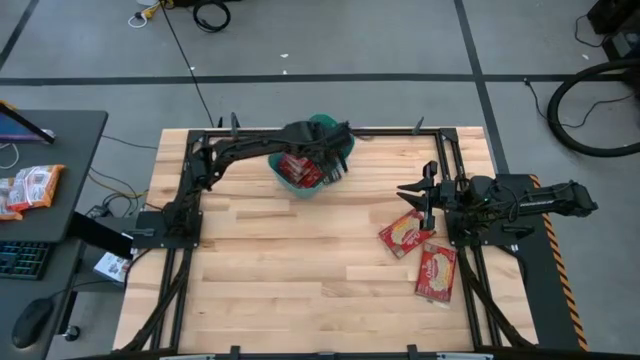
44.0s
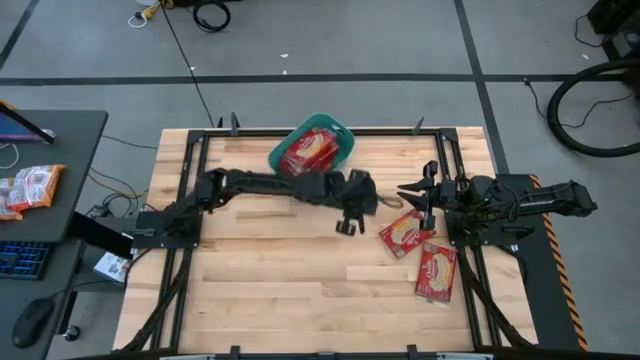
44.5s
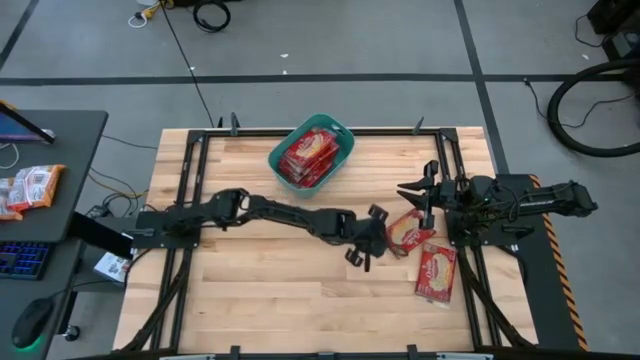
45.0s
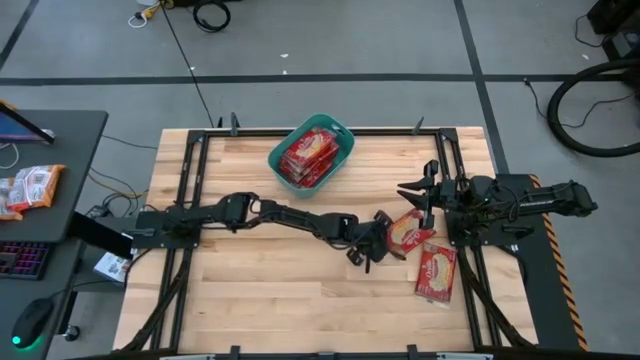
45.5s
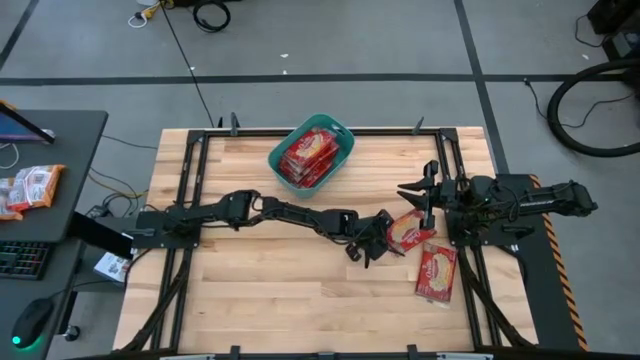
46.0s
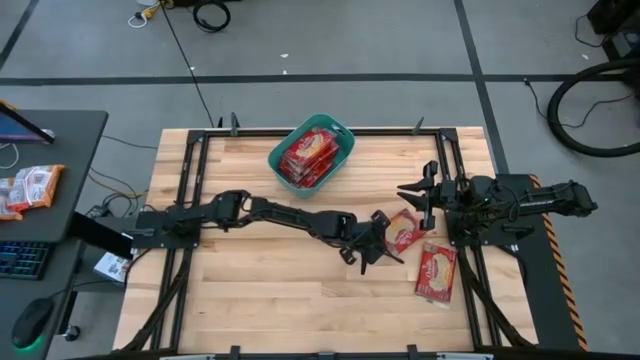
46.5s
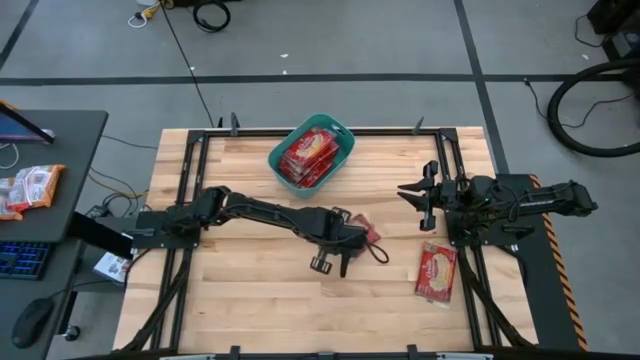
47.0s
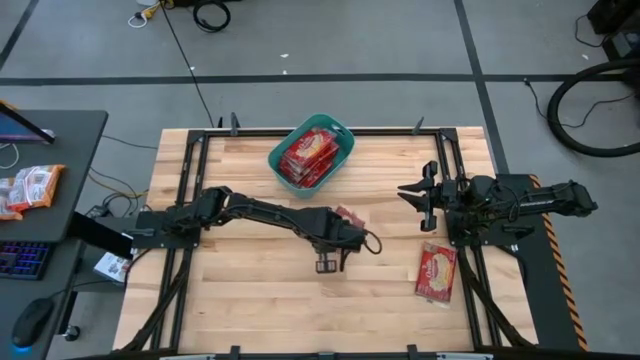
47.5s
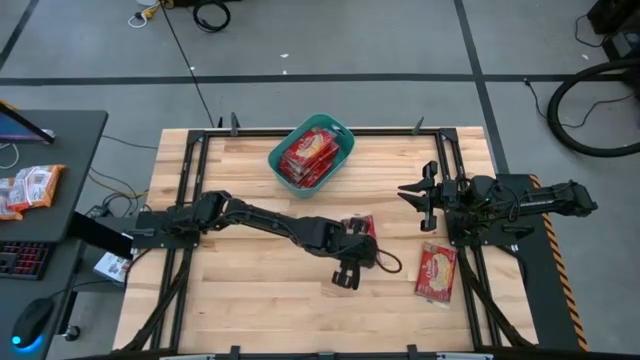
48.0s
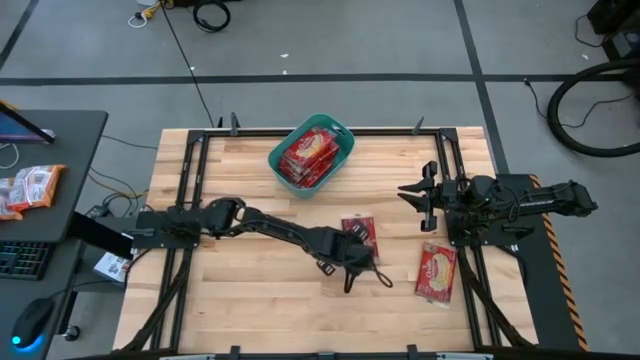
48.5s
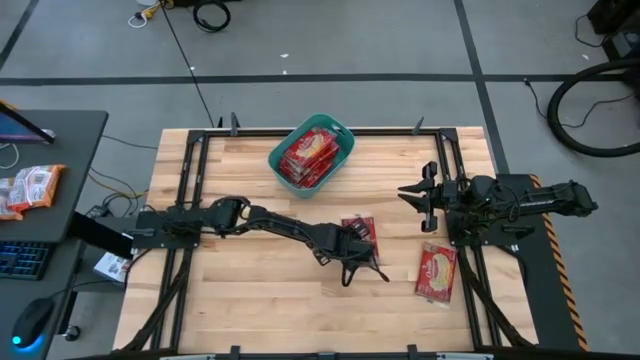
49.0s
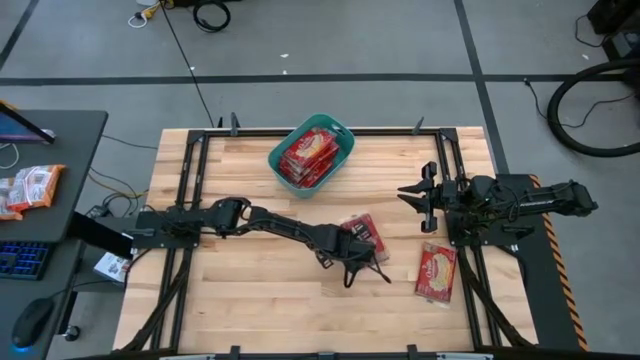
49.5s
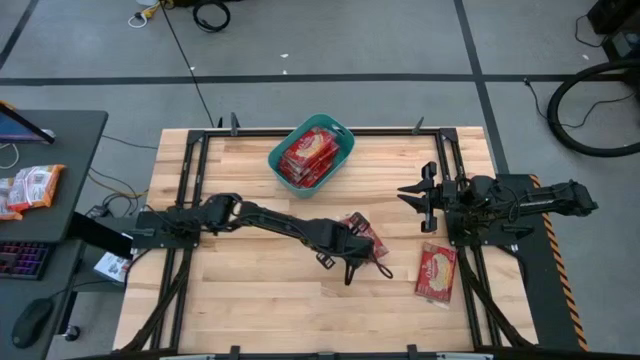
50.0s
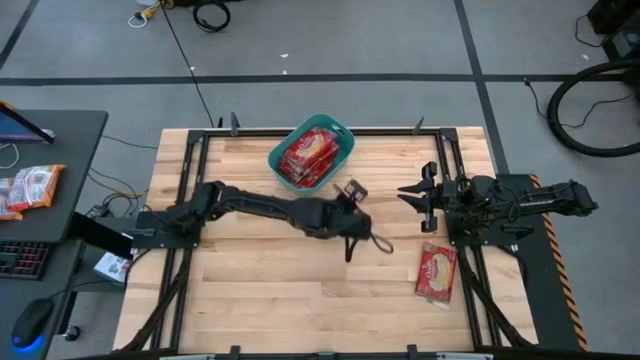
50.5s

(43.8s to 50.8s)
Task: Sort popcorn bags into baskets
Put the popcorn bag into the green bin

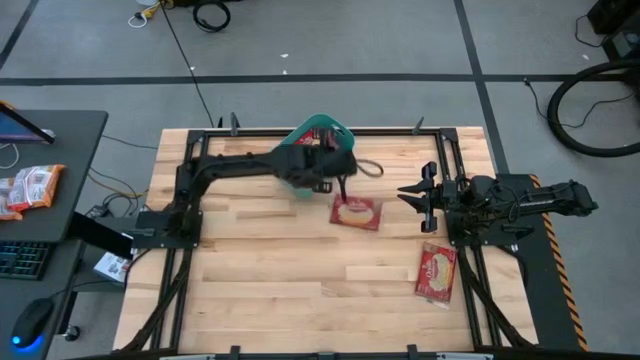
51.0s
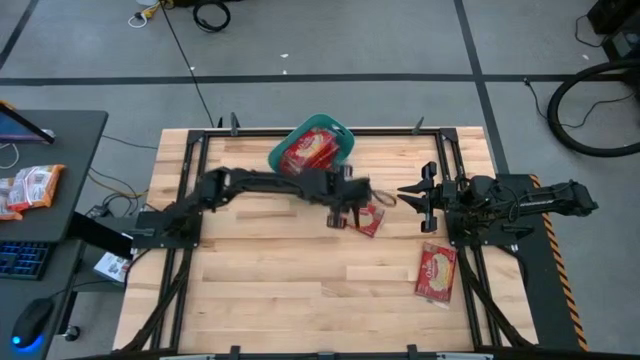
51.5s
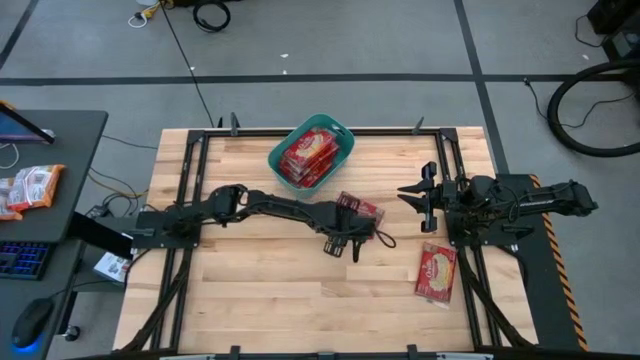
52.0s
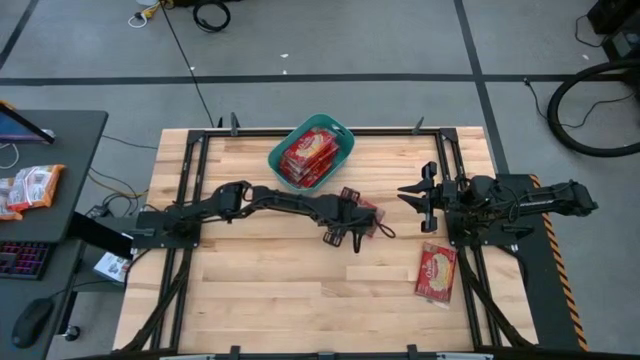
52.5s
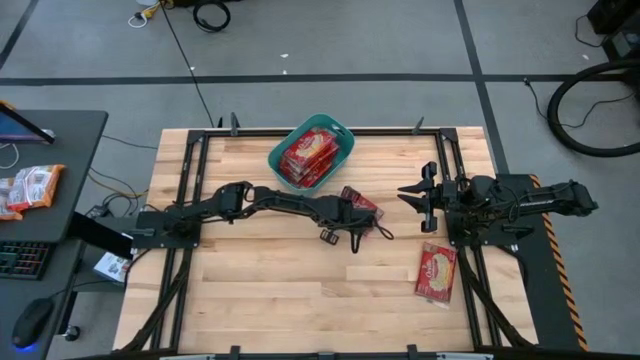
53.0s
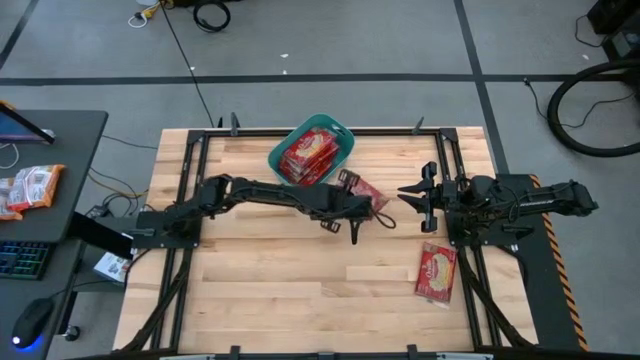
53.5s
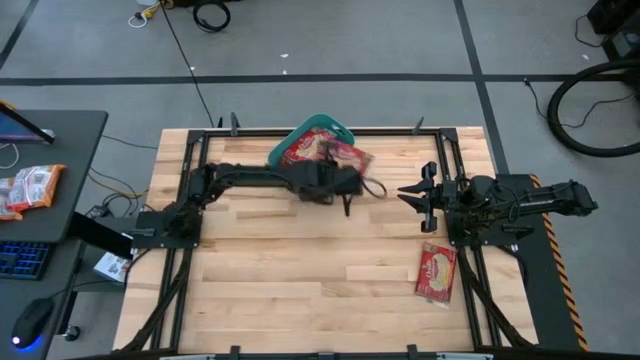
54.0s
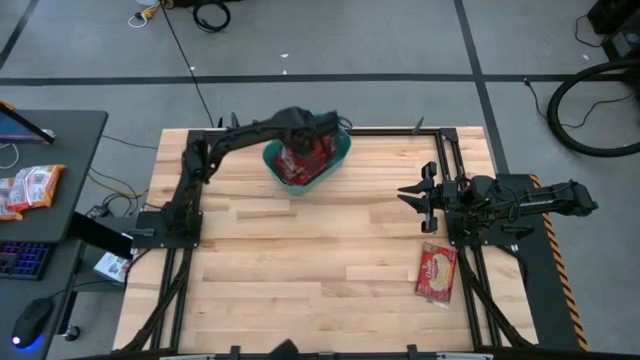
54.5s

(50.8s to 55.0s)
Put the popcorn bag into the green bin

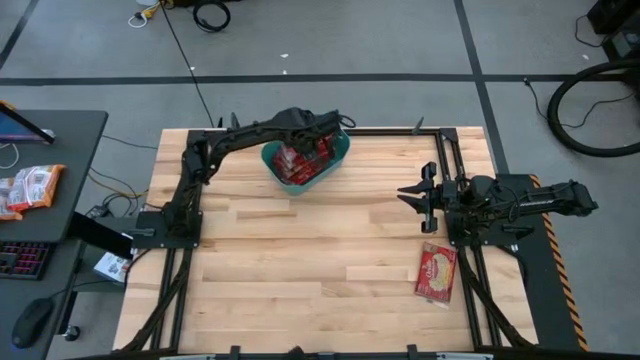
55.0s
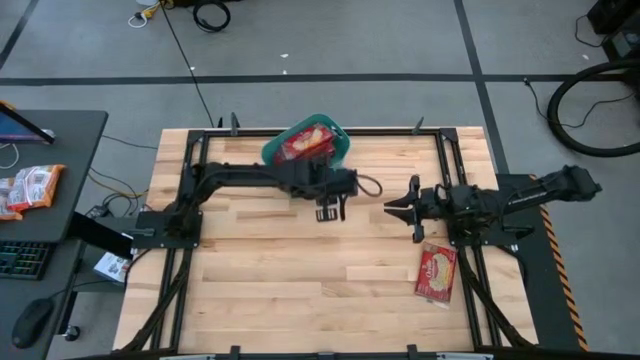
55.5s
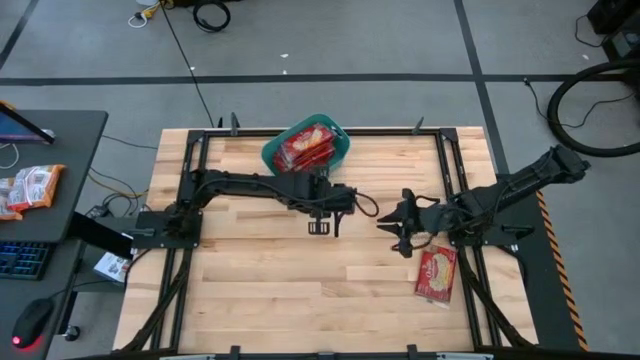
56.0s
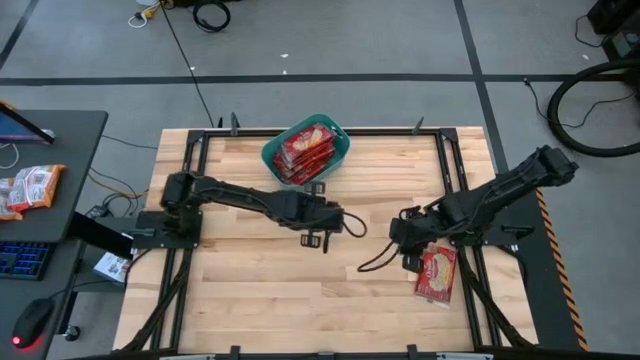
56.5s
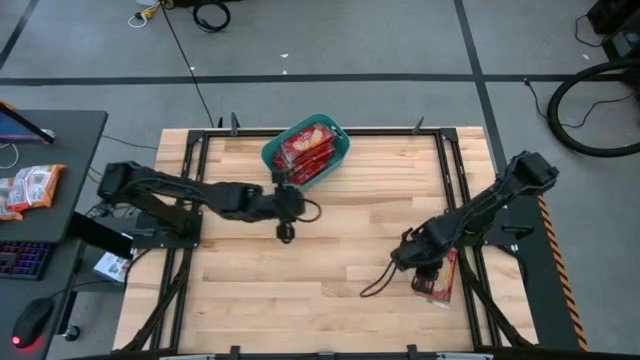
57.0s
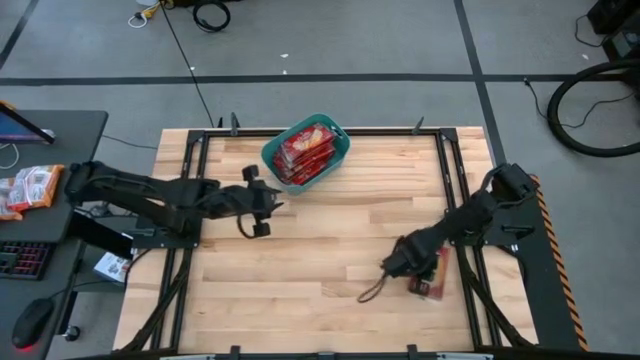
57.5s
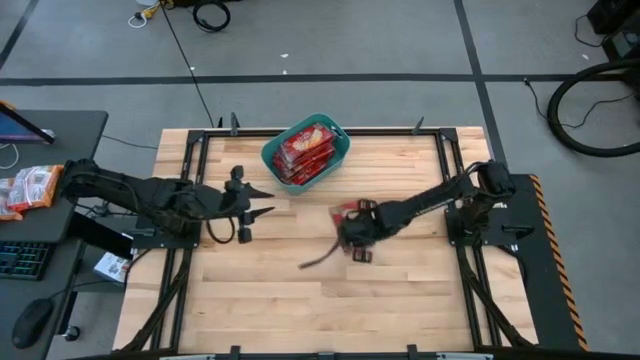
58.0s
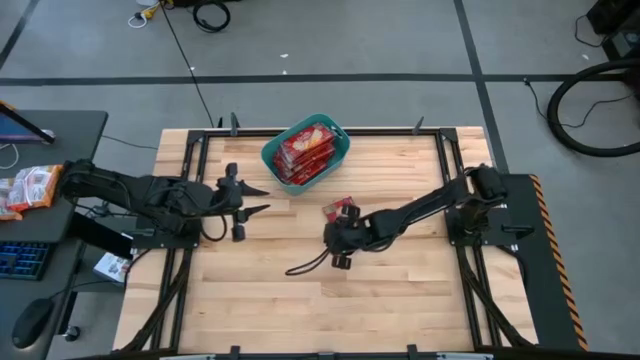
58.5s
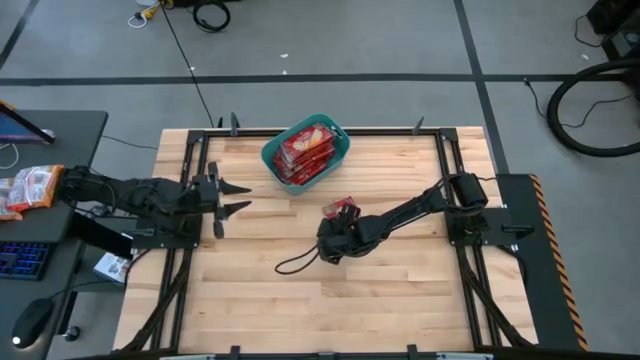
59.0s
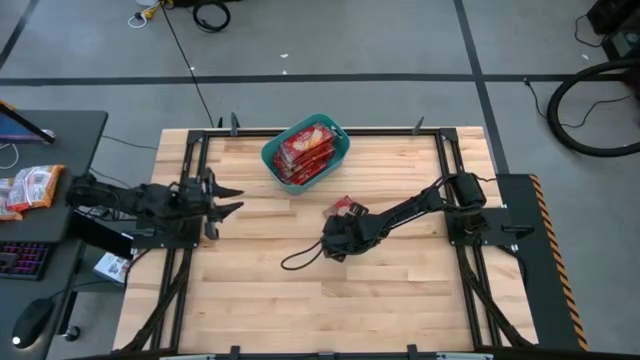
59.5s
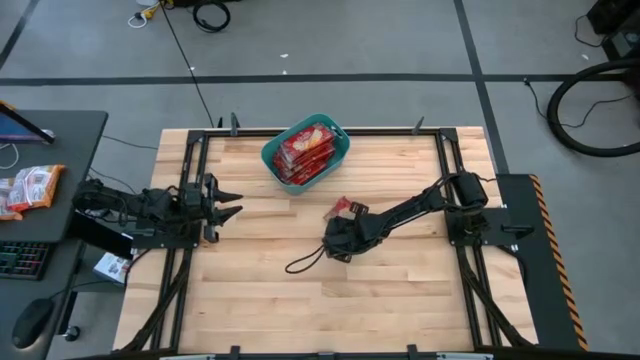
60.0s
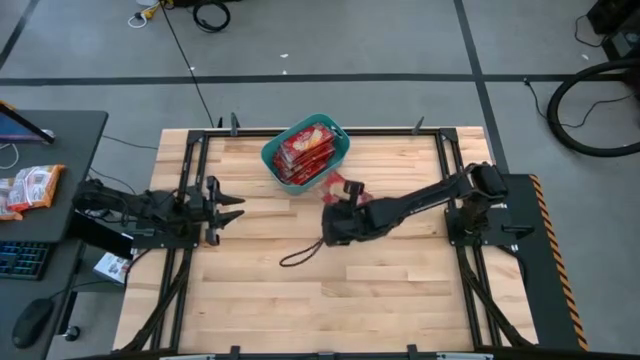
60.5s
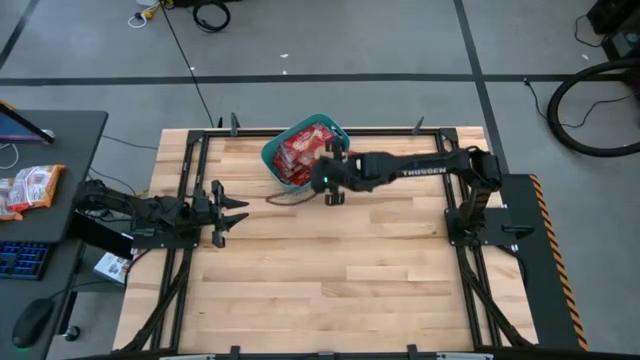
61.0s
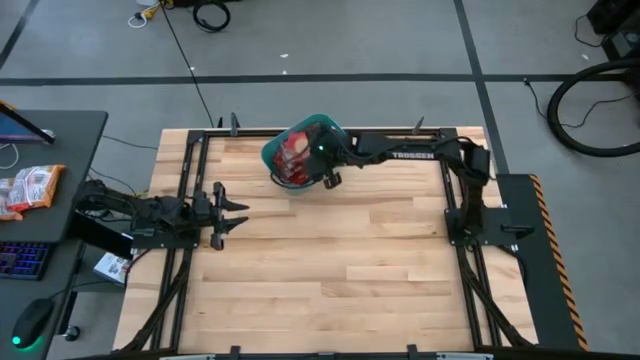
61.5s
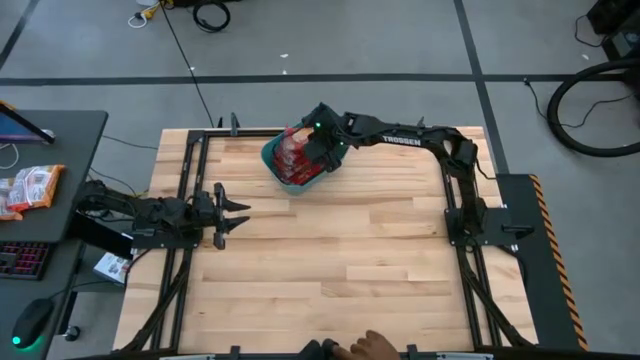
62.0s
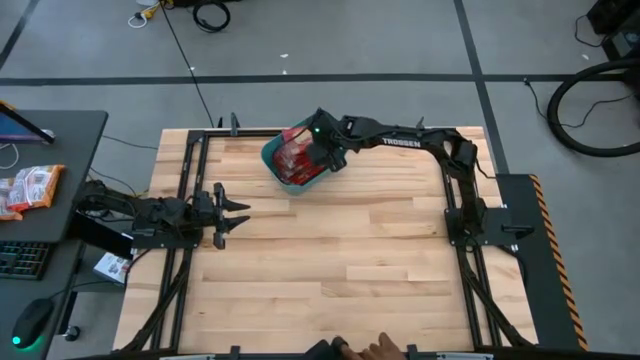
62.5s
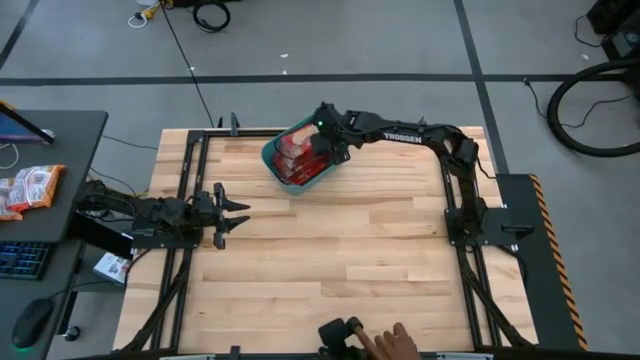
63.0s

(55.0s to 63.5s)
Put the popcorn bag into the green bin

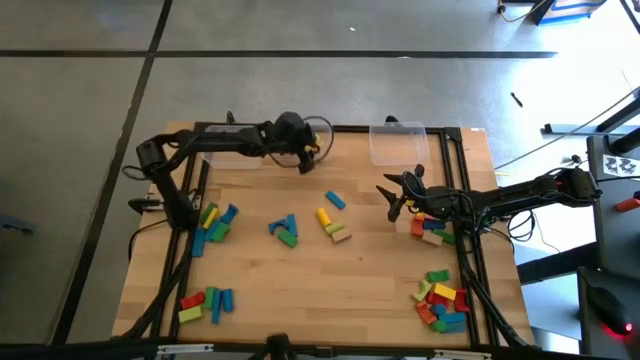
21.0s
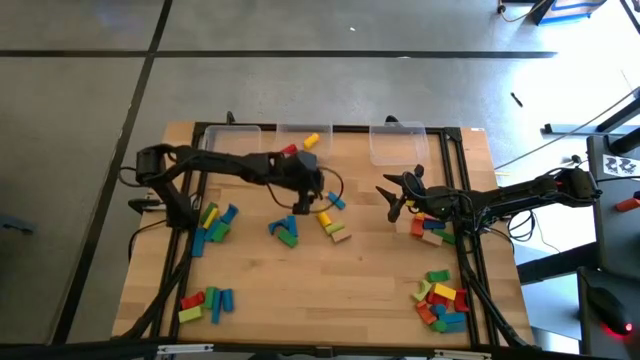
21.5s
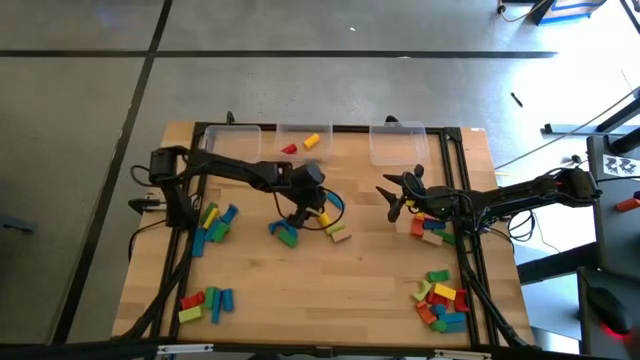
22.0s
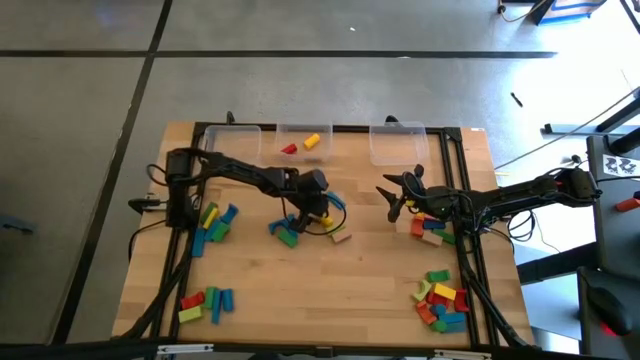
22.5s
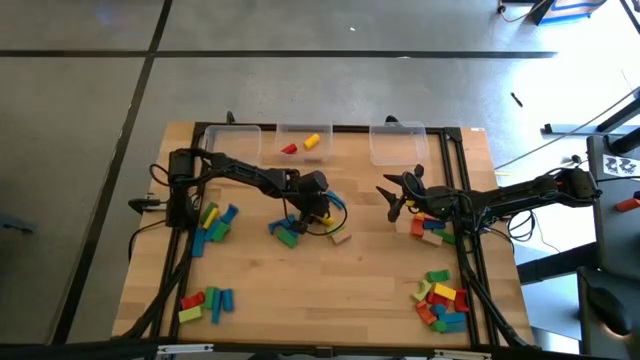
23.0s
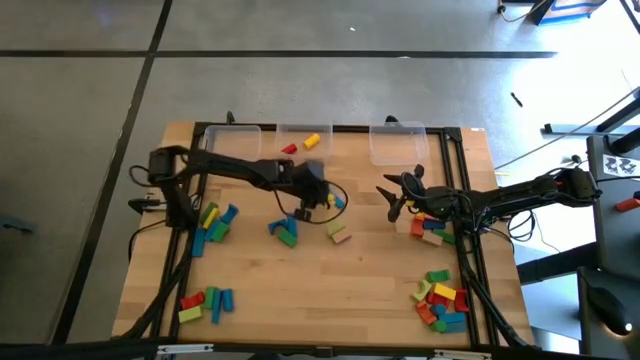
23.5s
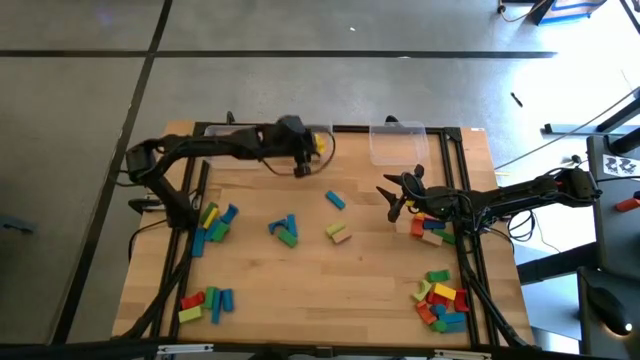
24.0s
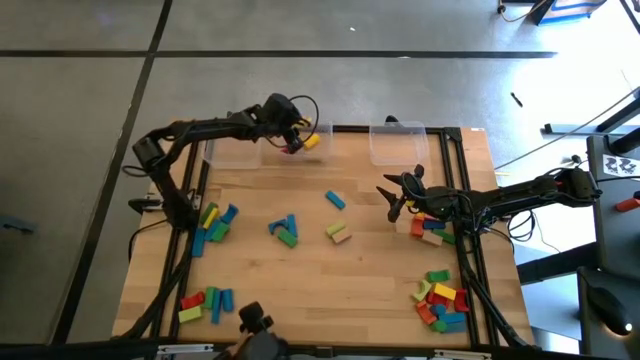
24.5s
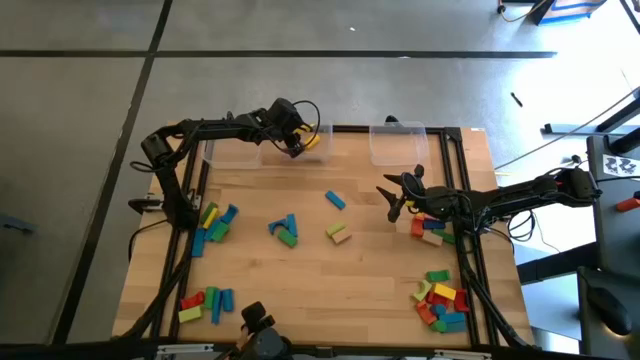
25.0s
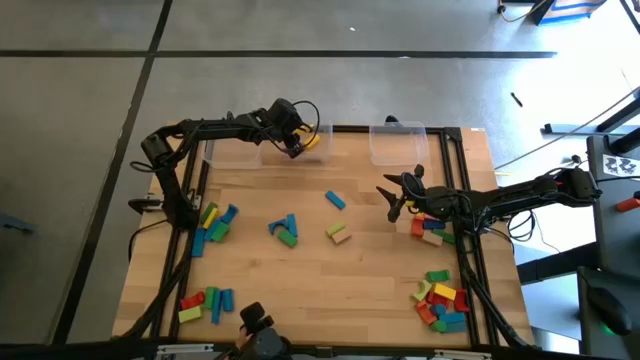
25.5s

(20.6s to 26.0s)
Task: Sort blocks by size
Put the yellow cylindrical block into the middle transparent bin
